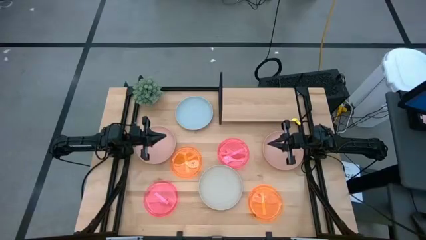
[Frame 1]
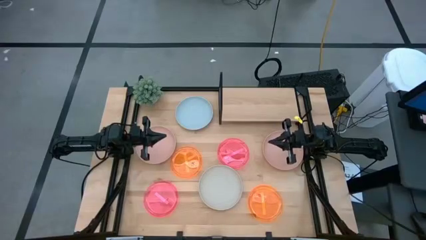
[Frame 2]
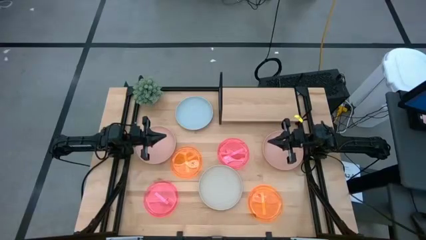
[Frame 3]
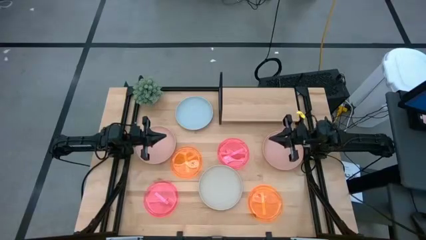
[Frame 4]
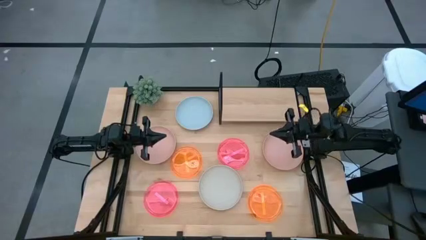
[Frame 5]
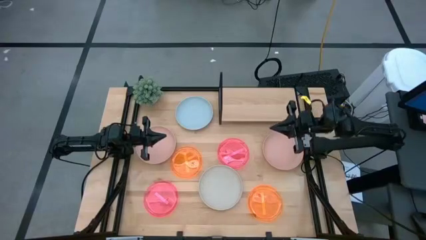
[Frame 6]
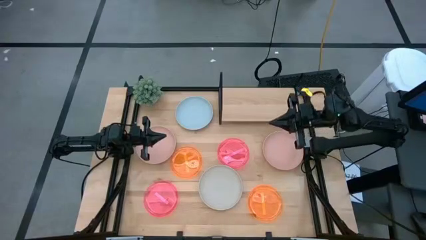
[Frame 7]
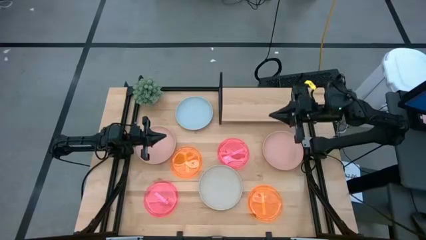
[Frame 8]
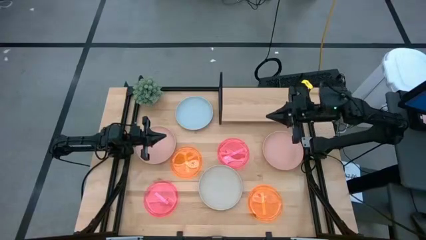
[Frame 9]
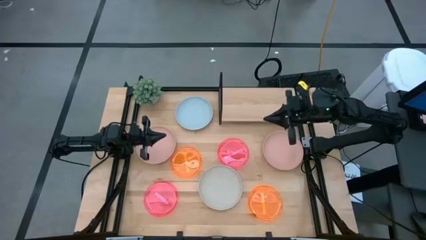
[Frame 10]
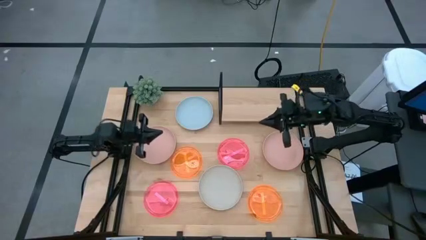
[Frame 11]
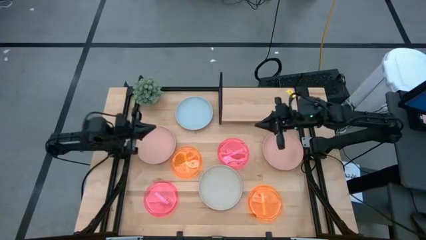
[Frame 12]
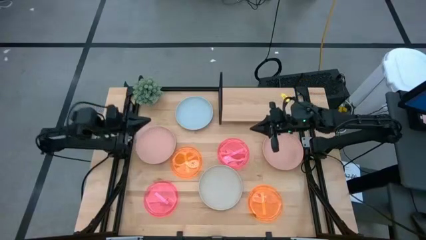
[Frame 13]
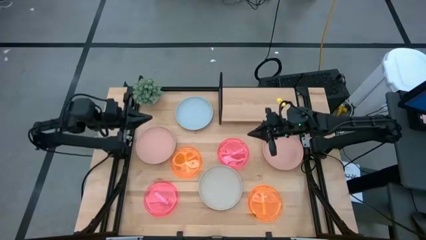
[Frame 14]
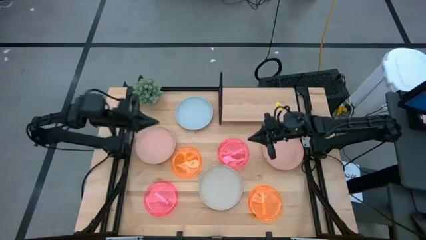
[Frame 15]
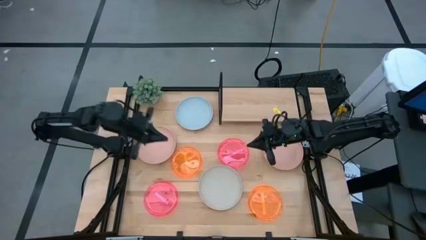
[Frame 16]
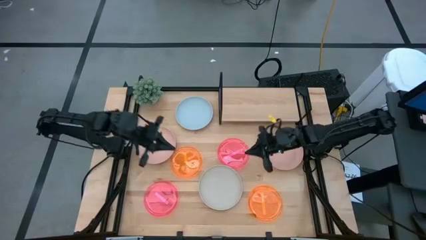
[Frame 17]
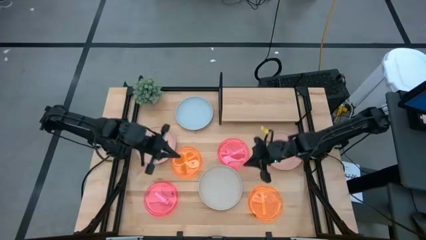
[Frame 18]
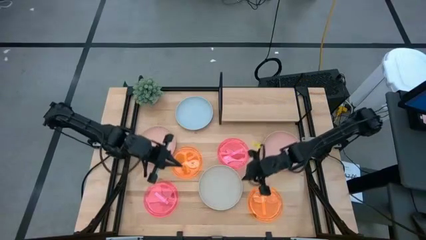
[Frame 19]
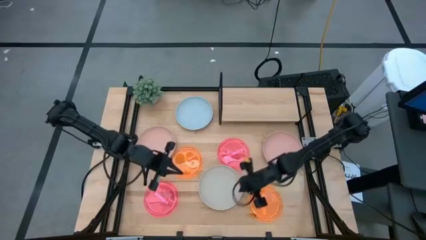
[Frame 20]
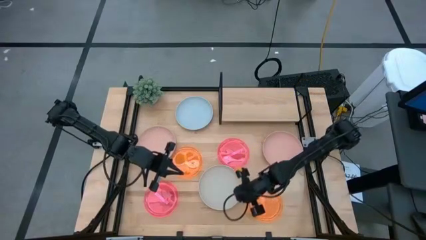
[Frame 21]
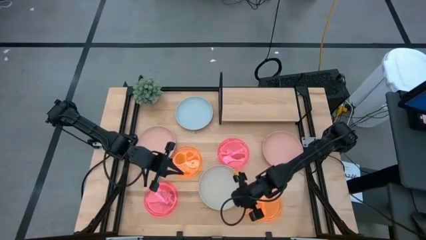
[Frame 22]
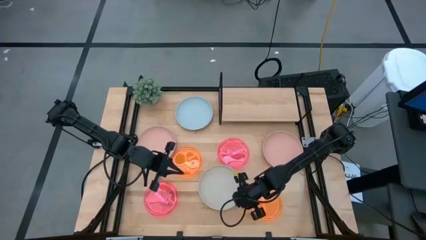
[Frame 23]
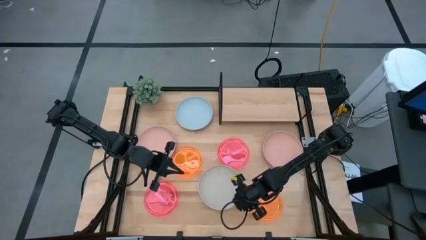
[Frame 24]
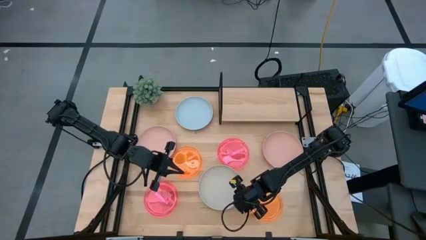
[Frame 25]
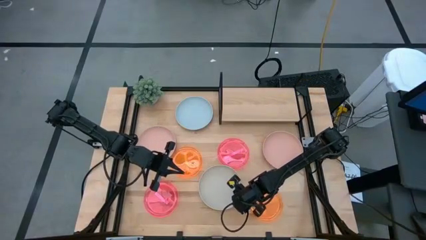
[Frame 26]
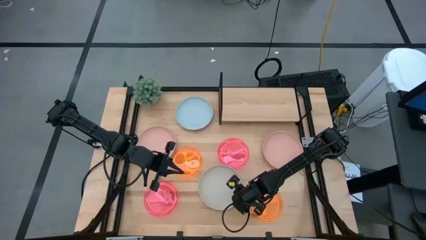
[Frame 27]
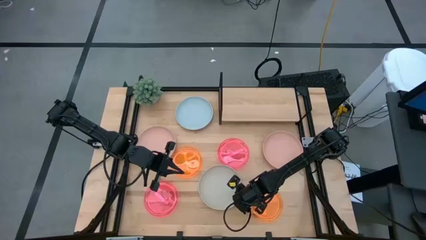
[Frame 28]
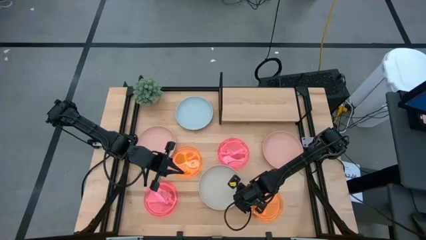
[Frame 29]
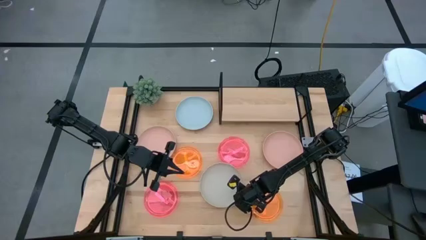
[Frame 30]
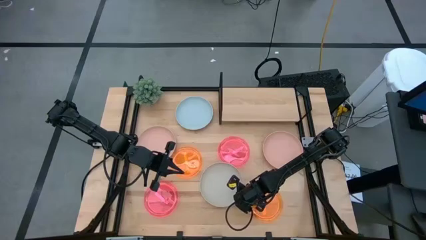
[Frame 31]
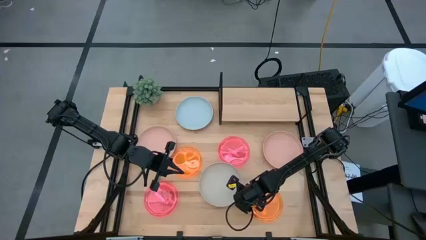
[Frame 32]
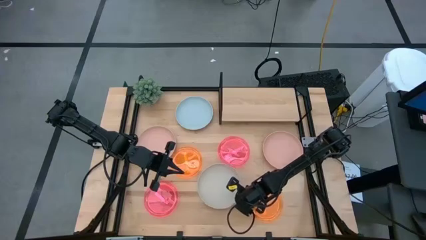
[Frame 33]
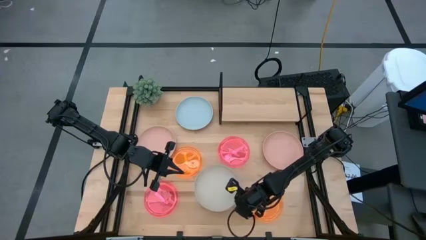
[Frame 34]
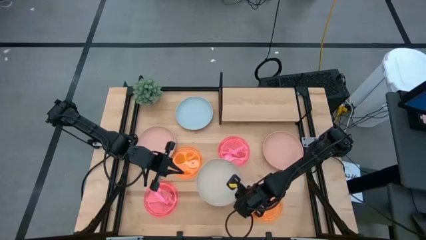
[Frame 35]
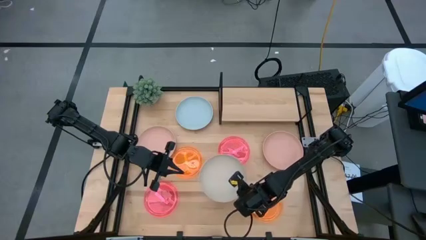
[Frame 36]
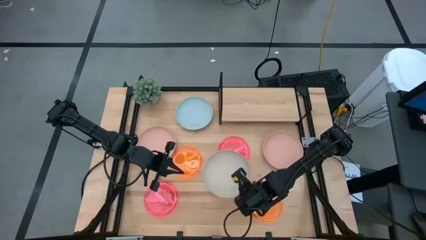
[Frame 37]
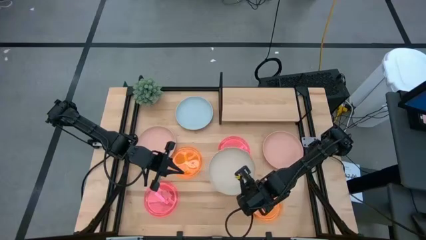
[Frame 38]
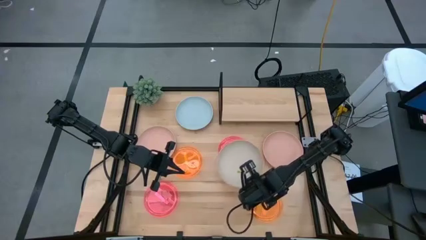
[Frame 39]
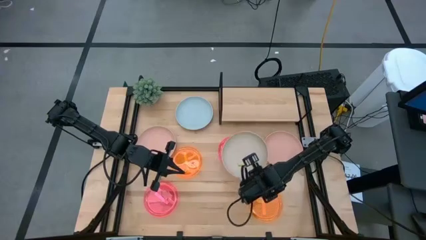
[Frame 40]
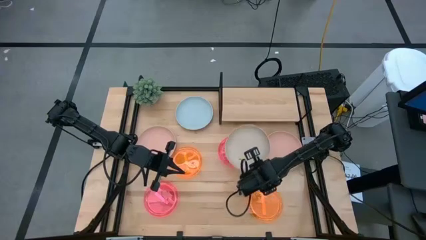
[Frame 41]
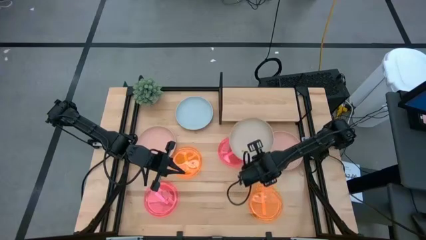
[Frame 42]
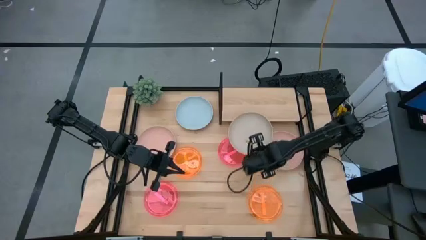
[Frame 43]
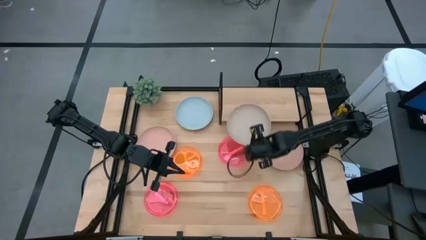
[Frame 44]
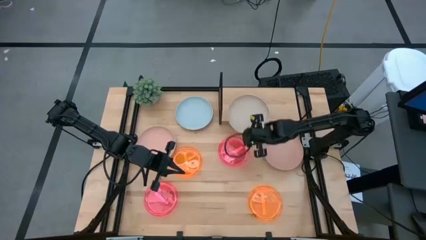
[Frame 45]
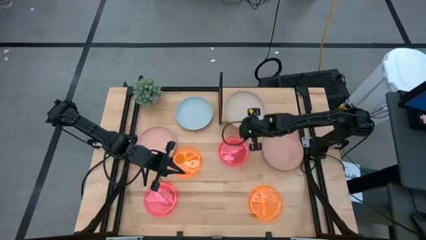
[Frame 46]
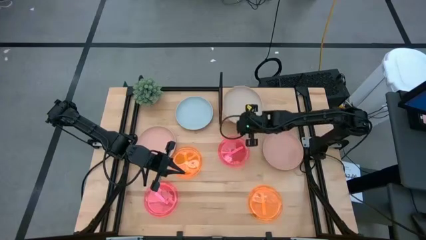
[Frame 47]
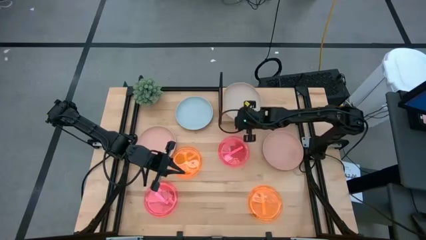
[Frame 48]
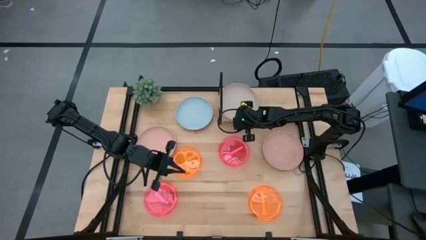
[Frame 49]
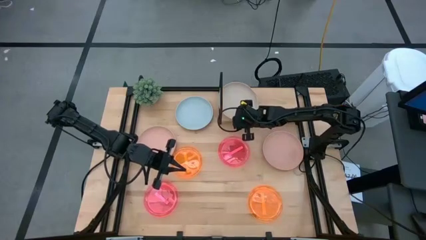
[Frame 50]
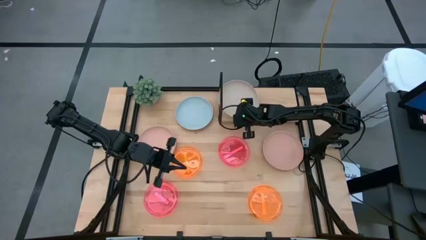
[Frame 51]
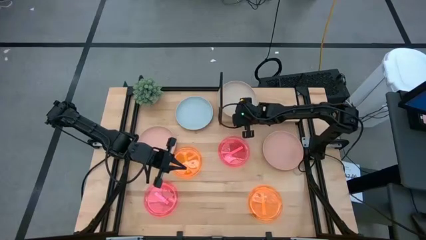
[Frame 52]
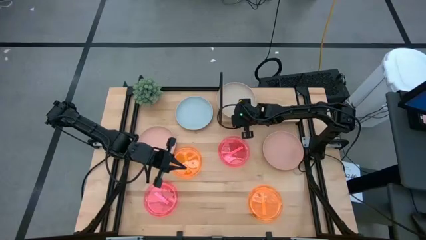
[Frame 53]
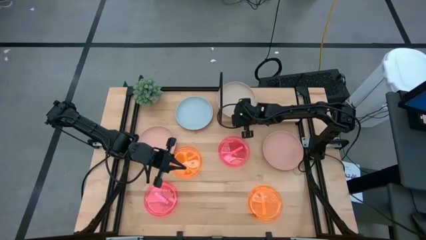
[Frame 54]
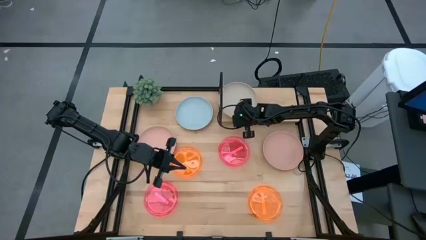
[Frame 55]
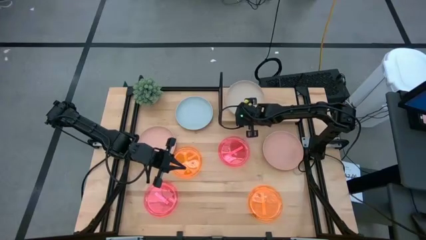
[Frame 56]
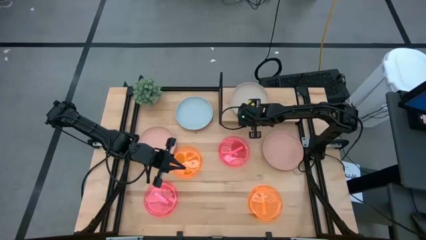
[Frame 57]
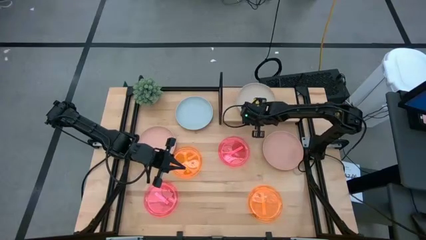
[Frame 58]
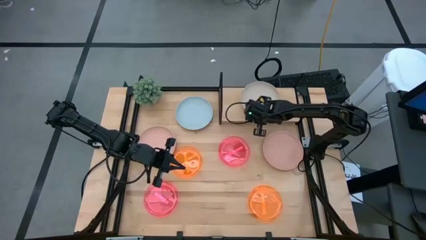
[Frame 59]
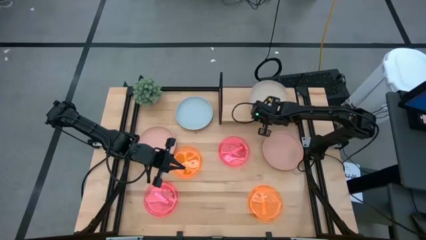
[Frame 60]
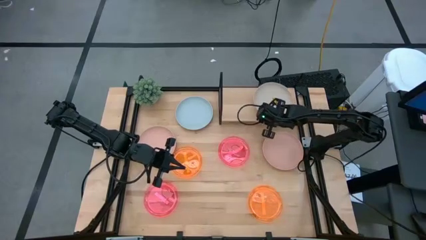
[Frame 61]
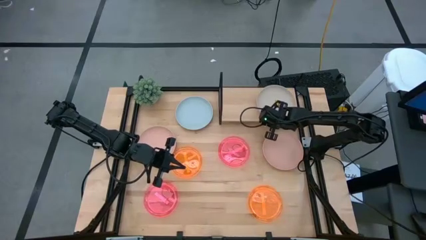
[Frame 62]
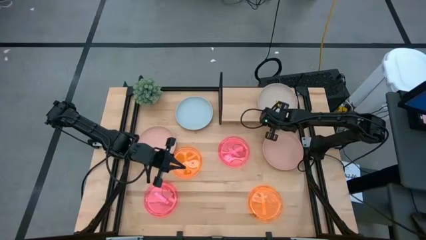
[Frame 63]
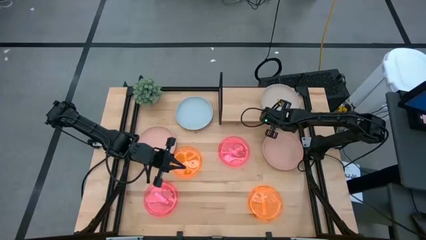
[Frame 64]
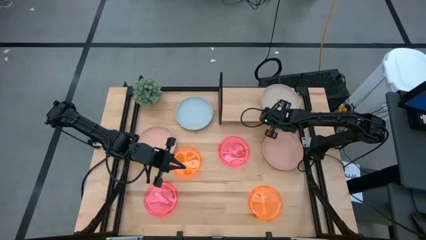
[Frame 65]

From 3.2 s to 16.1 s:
Task: Place and stack plates onto a shelf
Put the gray plate on the shelf
